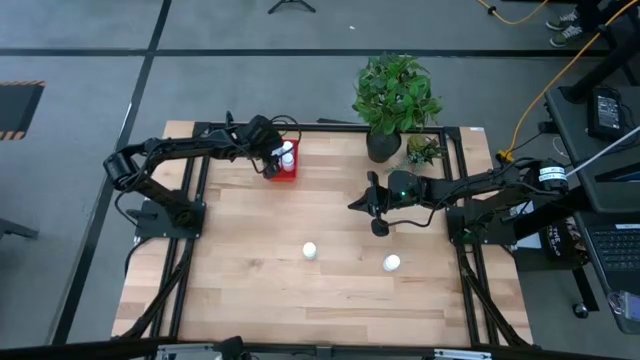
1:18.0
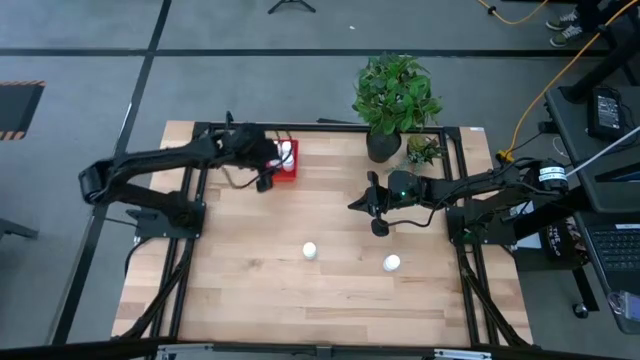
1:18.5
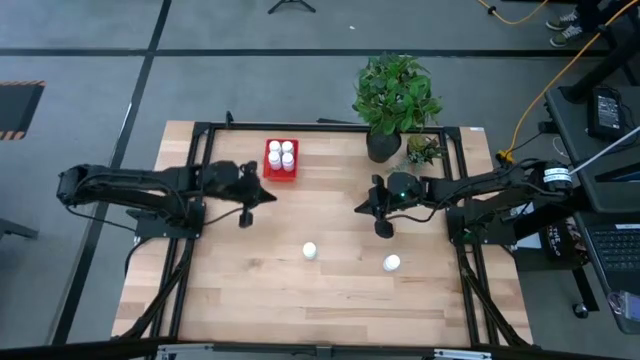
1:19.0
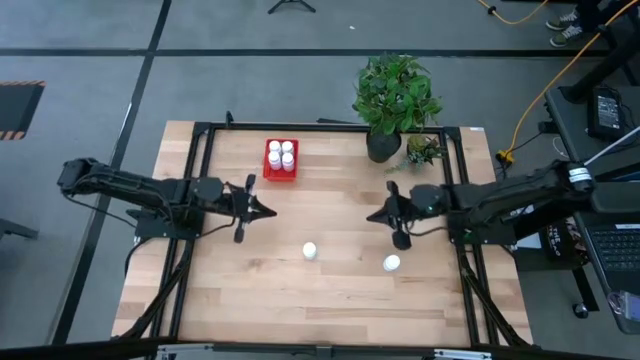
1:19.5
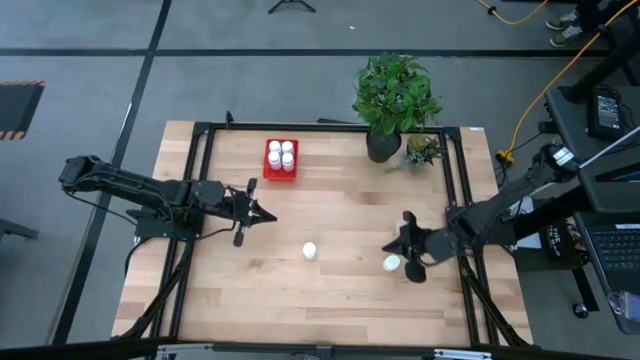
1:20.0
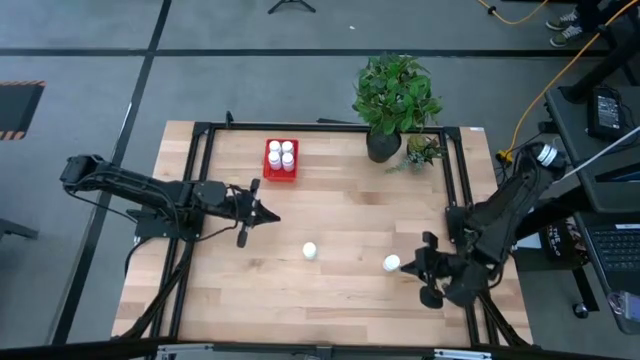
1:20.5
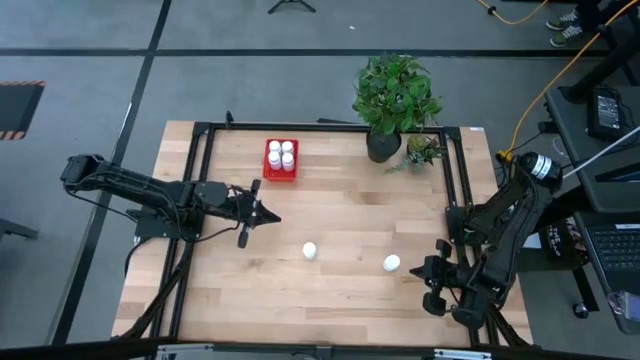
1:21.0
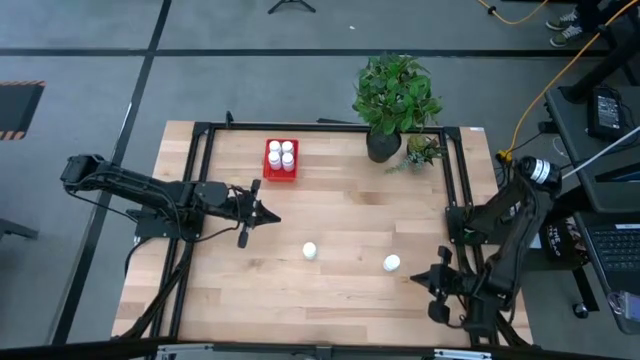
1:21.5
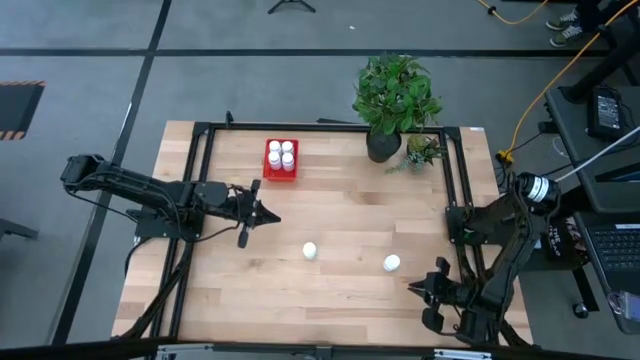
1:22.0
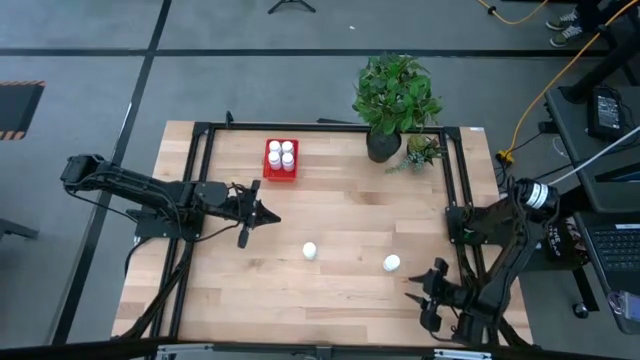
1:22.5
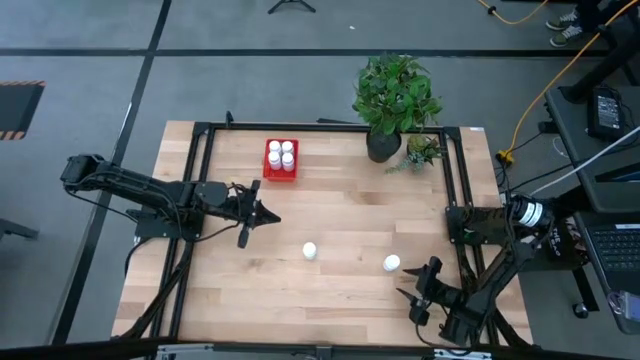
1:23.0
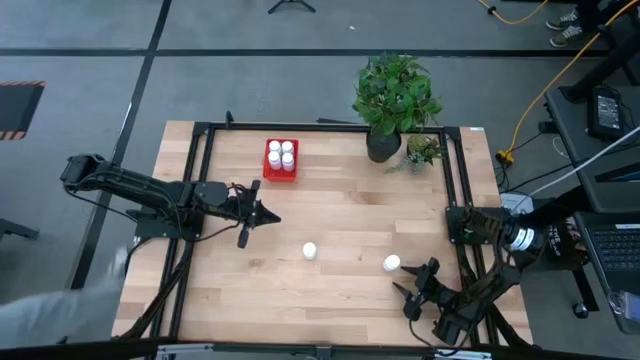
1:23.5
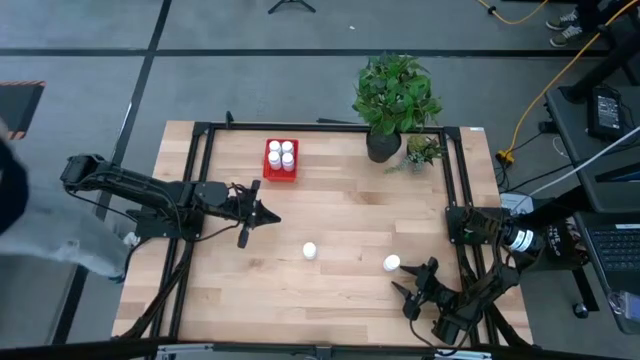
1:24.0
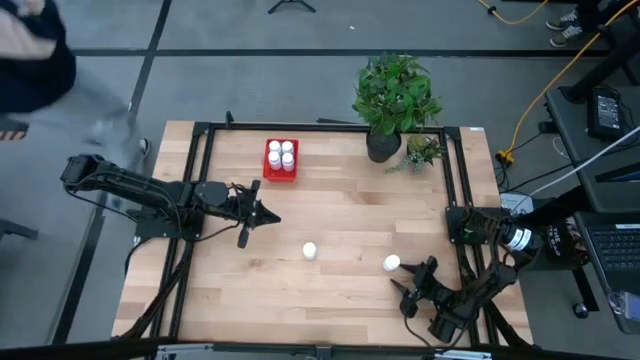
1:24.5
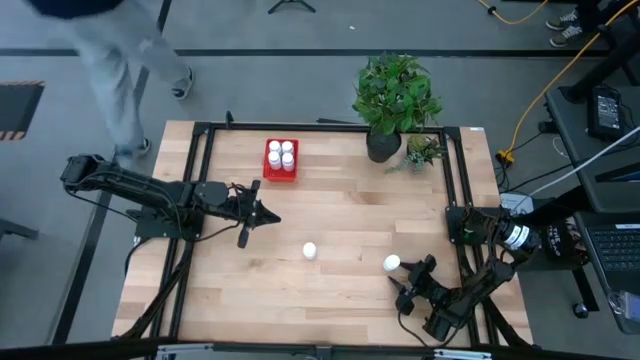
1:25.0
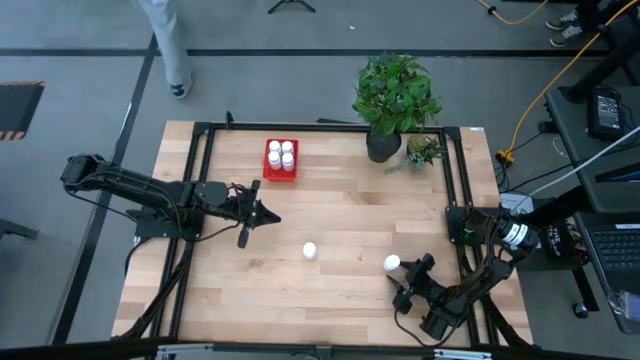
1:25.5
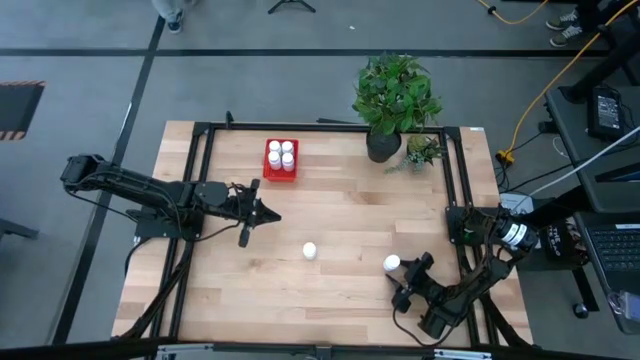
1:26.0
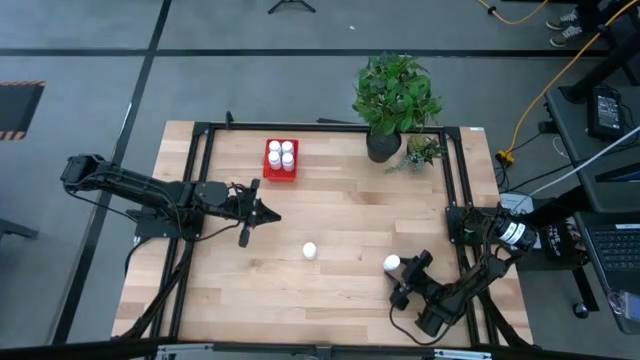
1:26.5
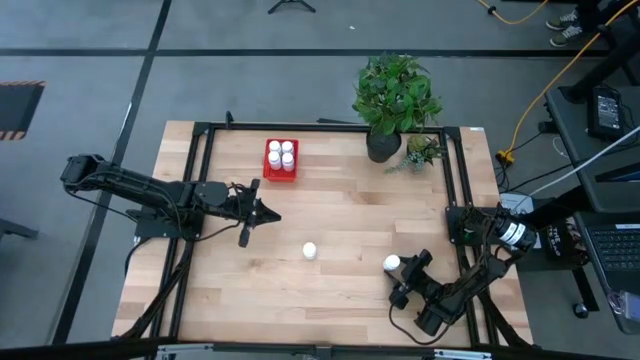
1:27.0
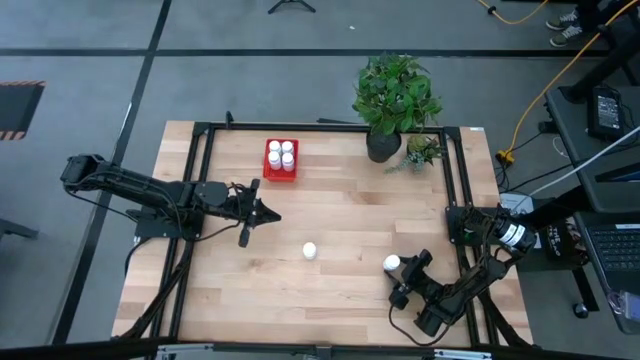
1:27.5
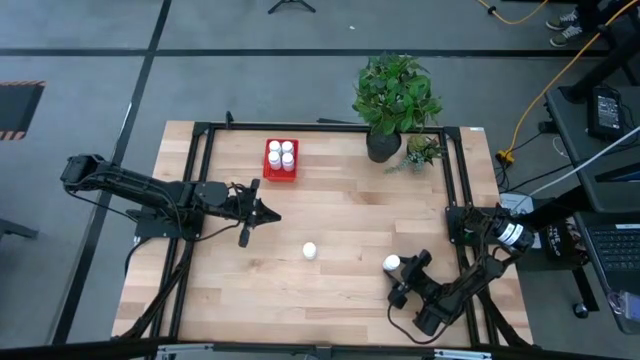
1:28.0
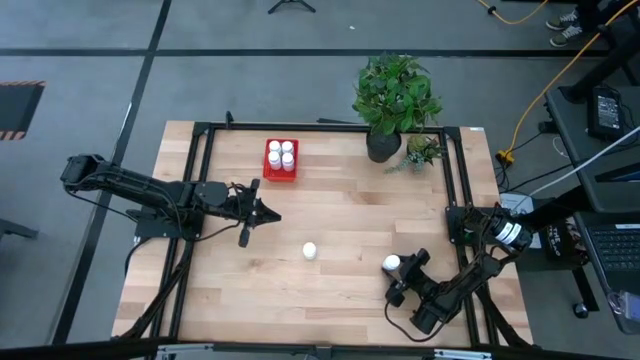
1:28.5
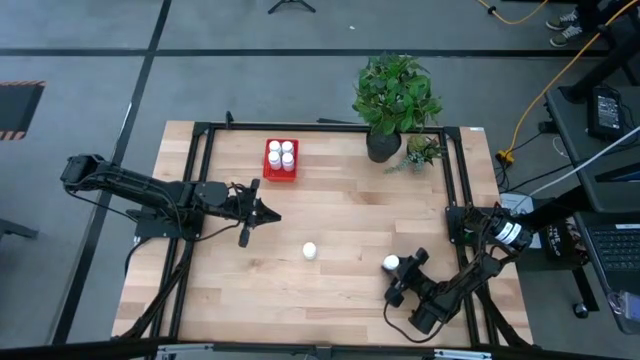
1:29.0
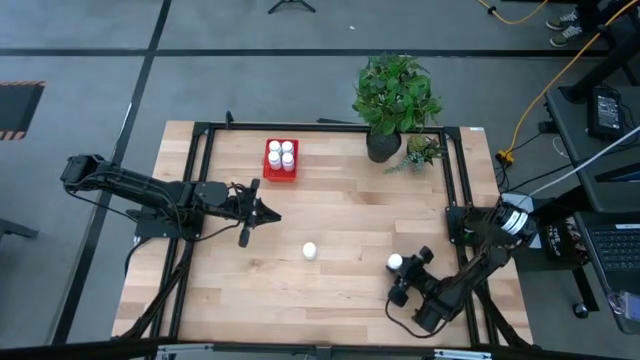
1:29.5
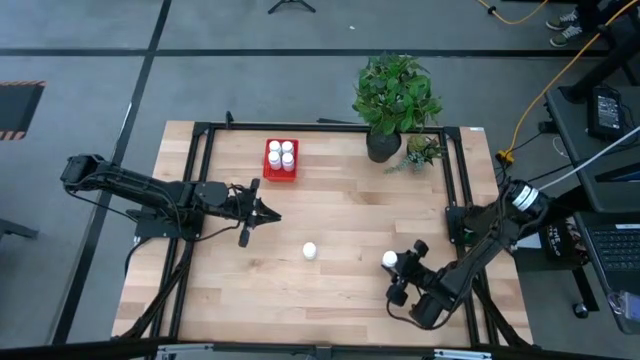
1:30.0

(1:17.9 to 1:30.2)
Task: Pick and place pill bottles into a basket
Put the white pill bottle into the red bin

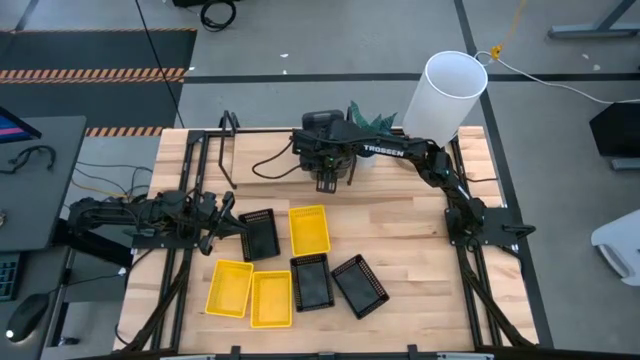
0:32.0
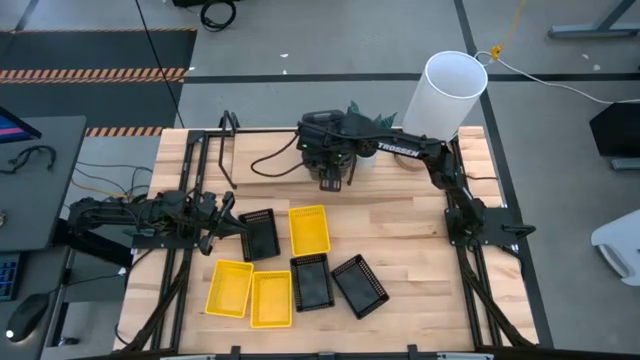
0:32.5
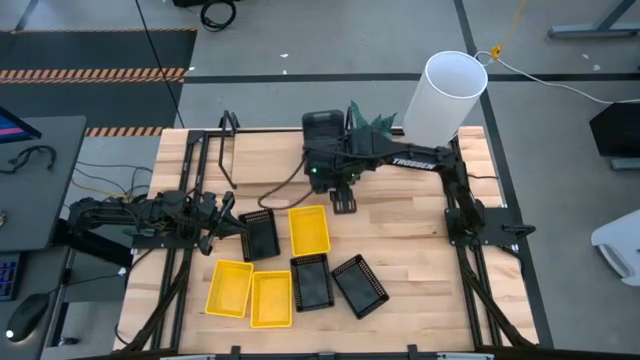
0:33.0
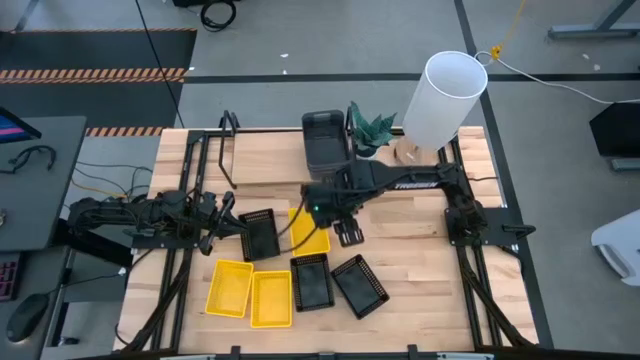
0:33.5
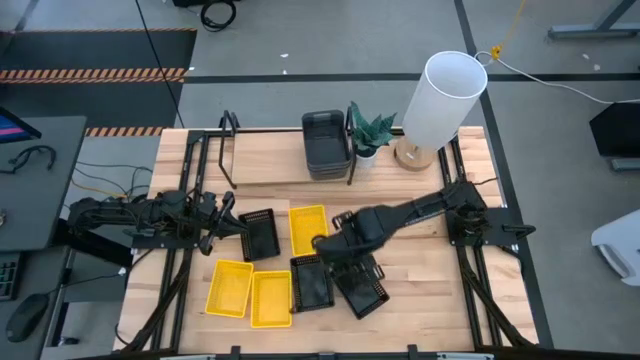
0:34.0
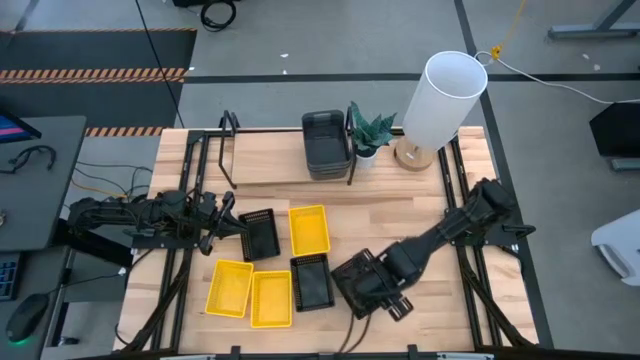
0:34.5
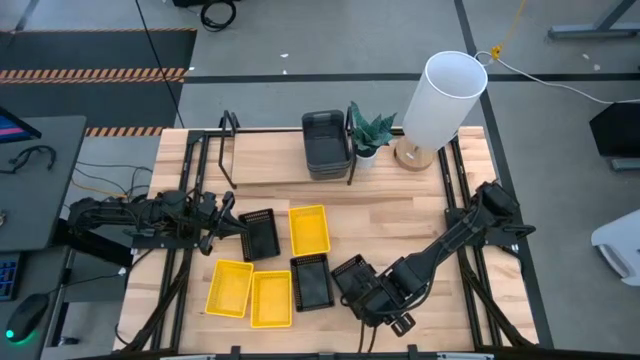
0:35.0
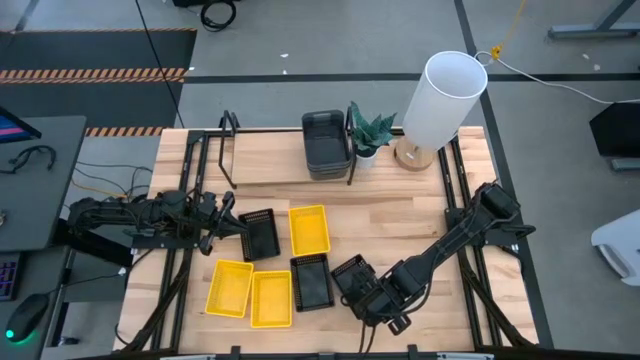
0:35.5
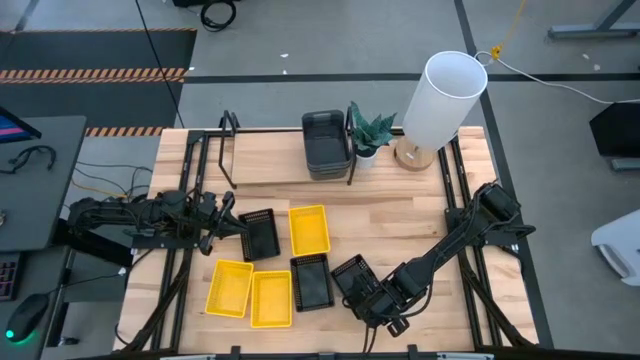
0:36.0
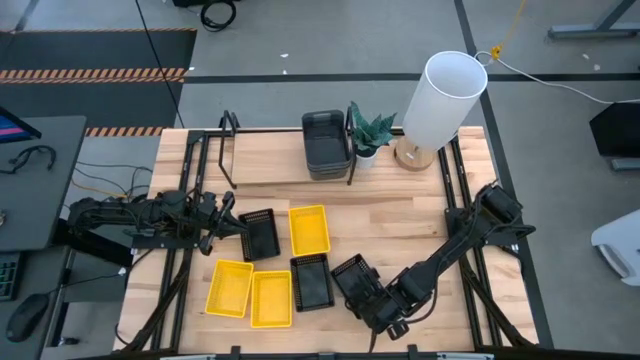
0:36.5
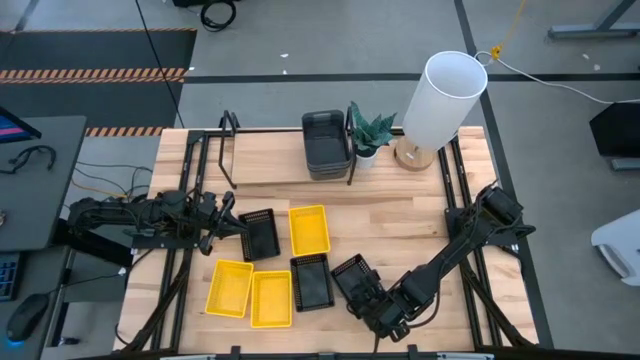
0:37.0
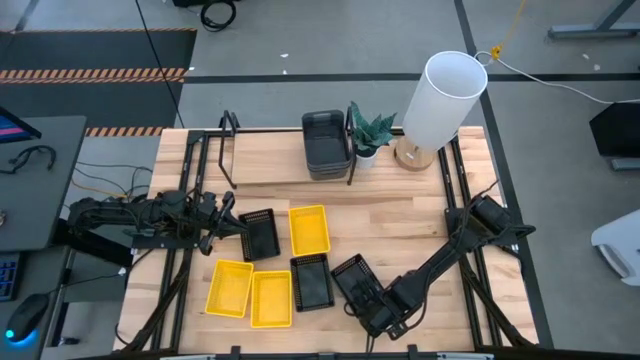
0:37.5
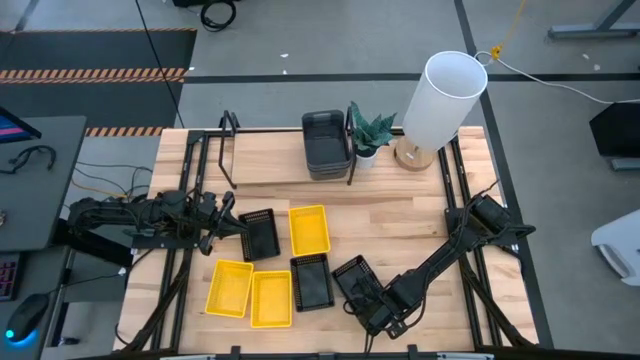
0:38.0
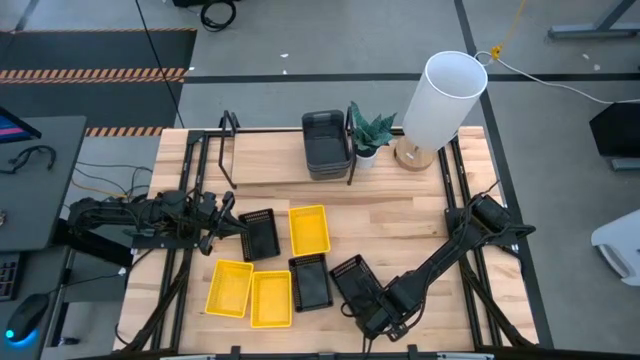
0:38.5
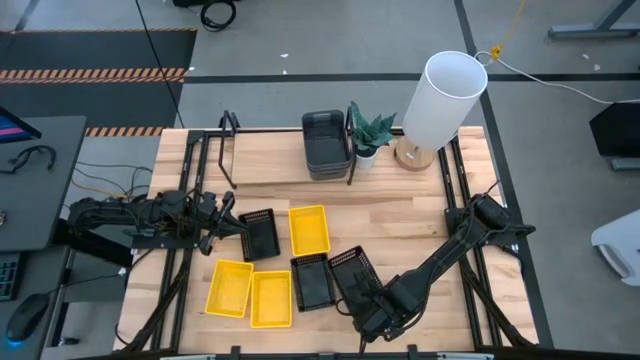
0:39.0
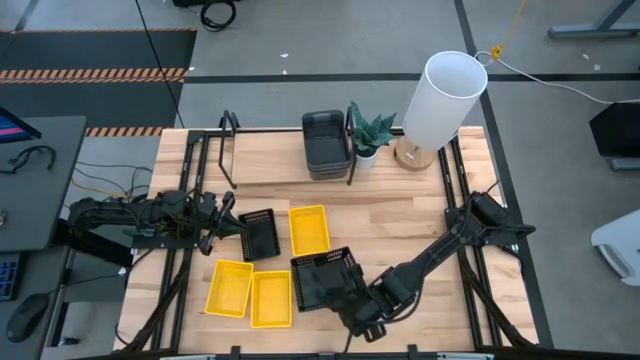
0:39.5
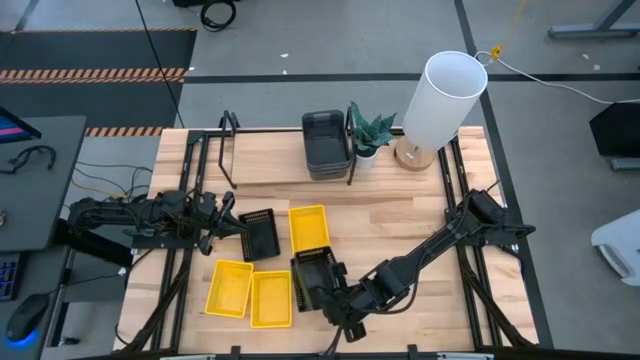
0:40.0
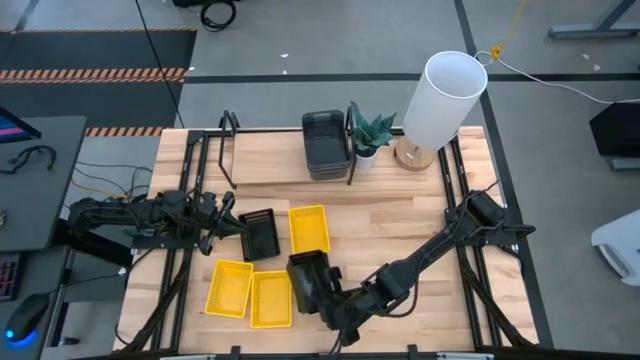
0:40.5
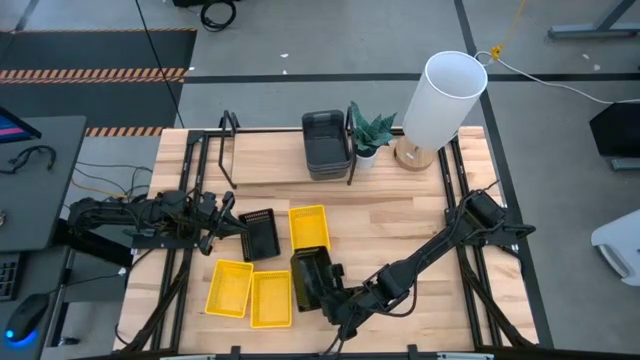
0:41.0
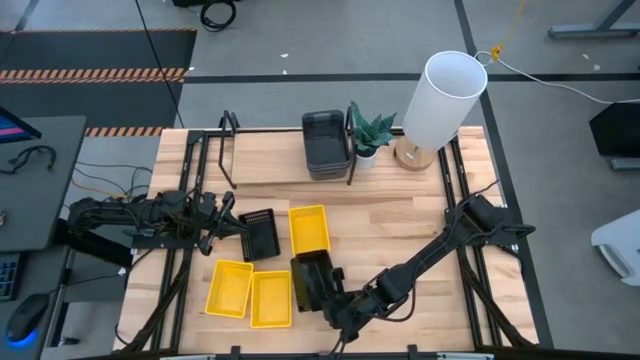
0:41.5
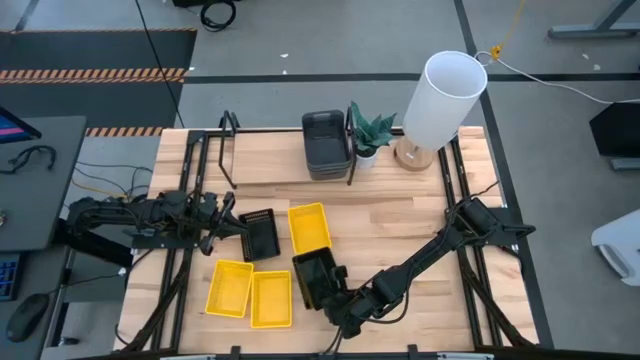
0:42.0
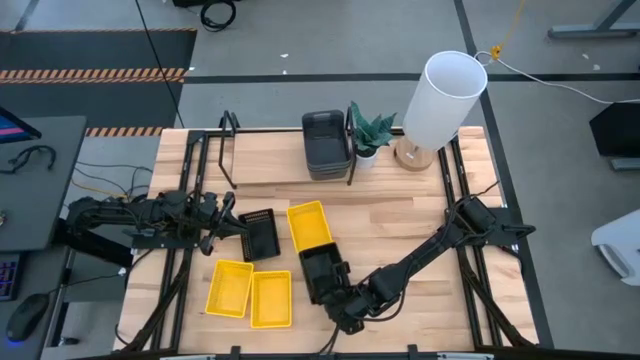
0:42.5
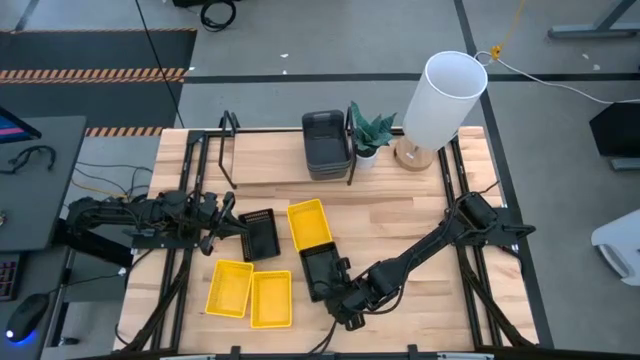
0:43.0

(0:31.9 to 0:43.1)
Task: Stack baskets on shelf by color
Stack the bottom right black bin on top of the bottom left black bin
